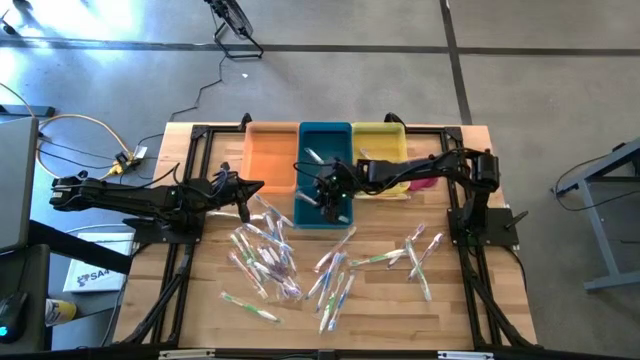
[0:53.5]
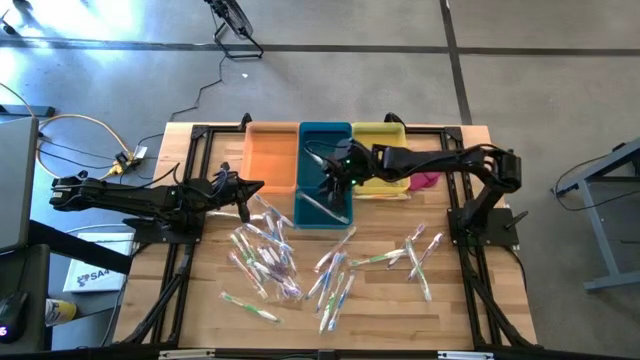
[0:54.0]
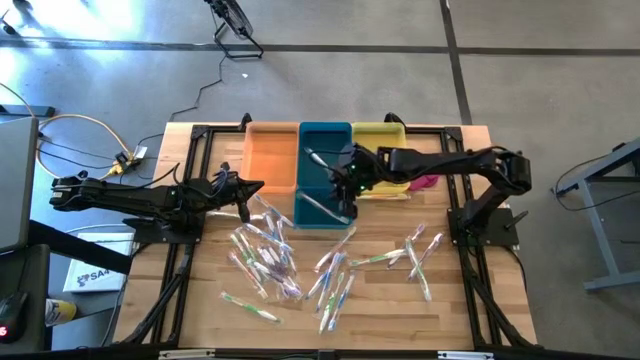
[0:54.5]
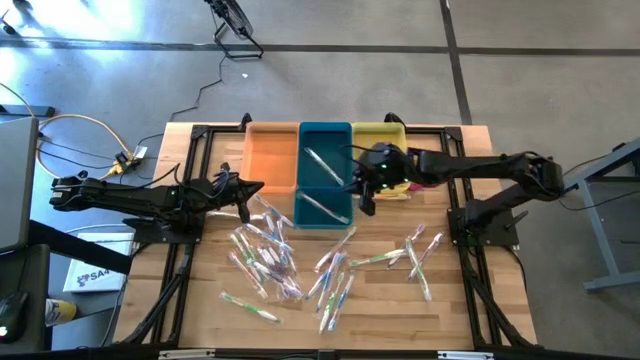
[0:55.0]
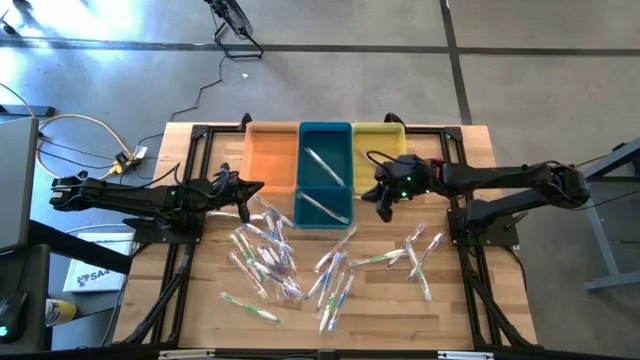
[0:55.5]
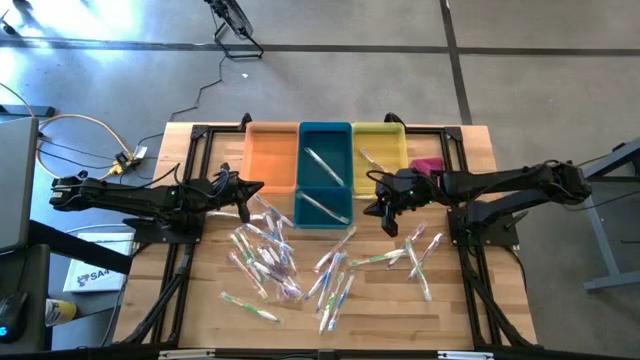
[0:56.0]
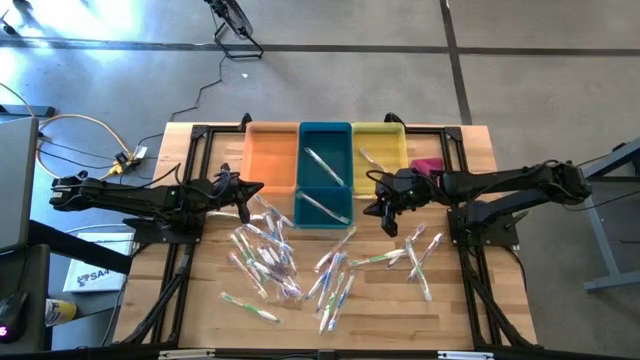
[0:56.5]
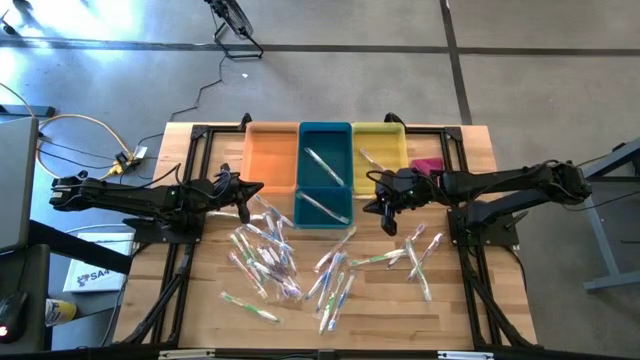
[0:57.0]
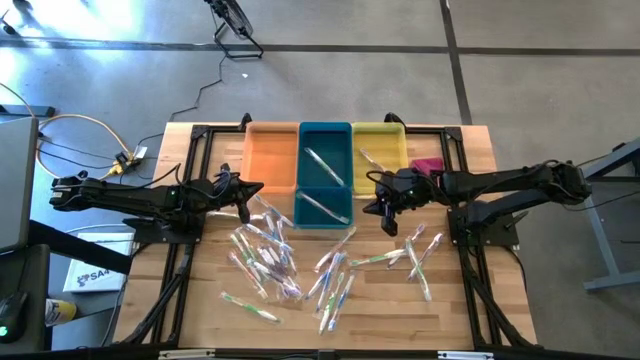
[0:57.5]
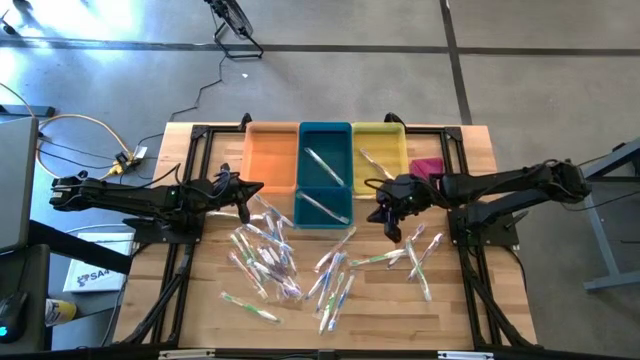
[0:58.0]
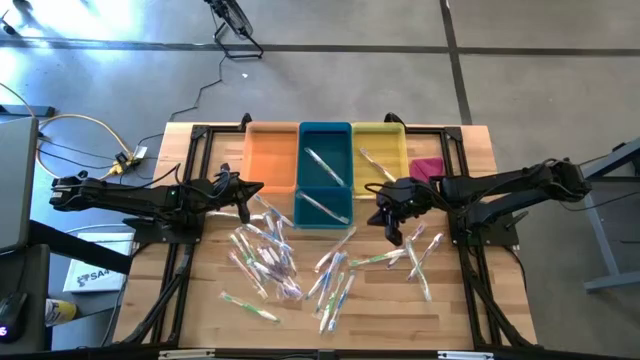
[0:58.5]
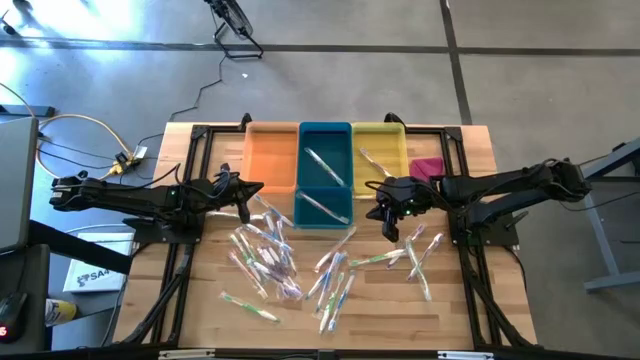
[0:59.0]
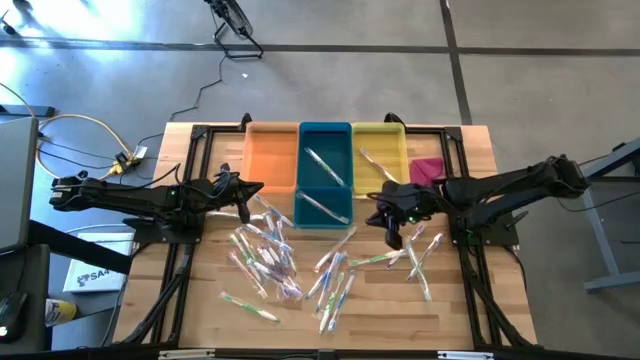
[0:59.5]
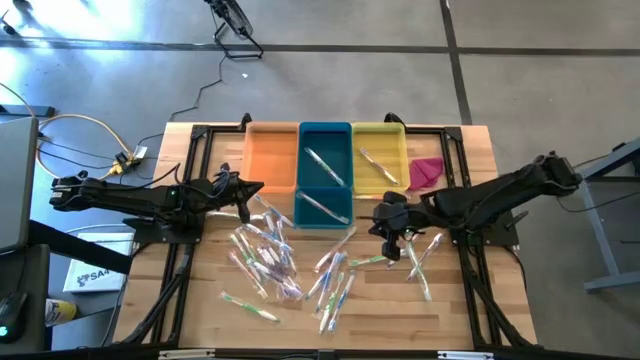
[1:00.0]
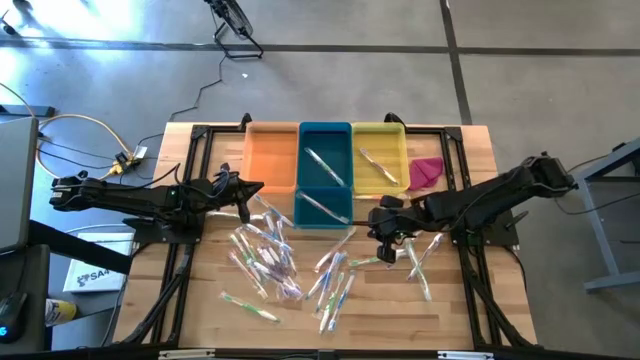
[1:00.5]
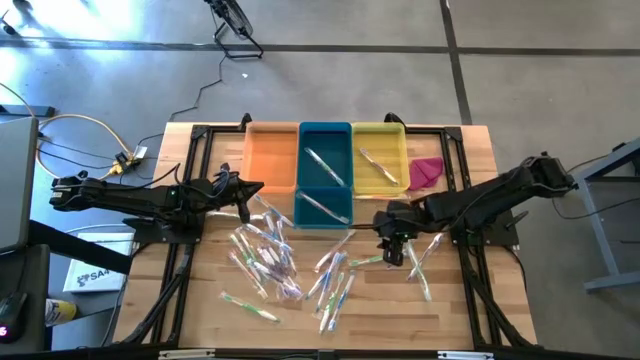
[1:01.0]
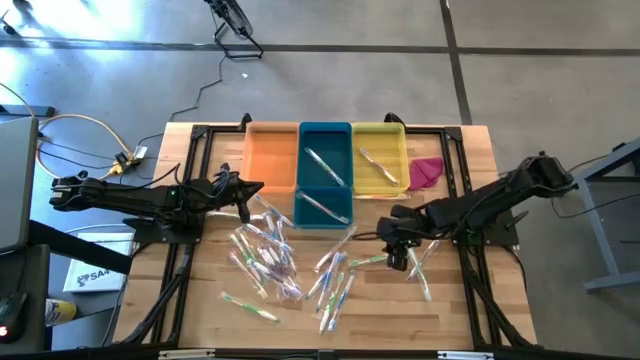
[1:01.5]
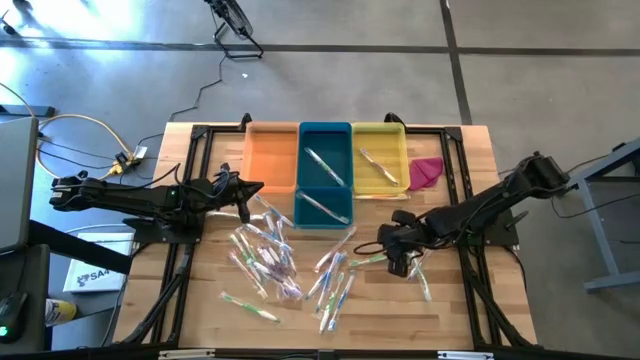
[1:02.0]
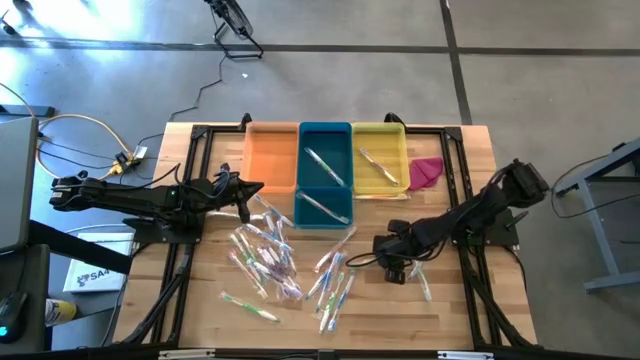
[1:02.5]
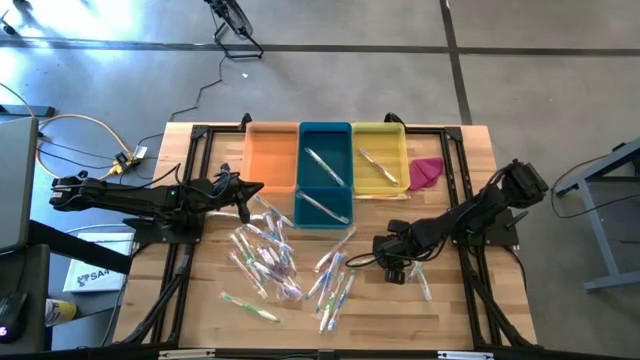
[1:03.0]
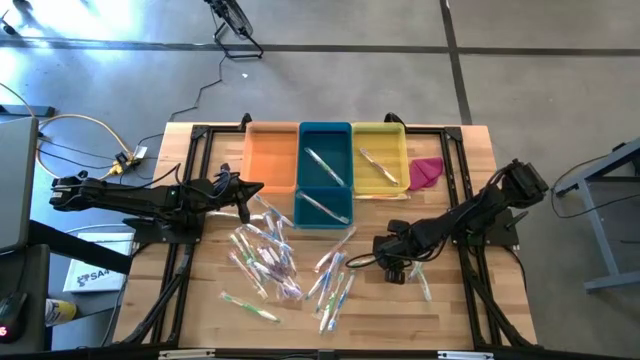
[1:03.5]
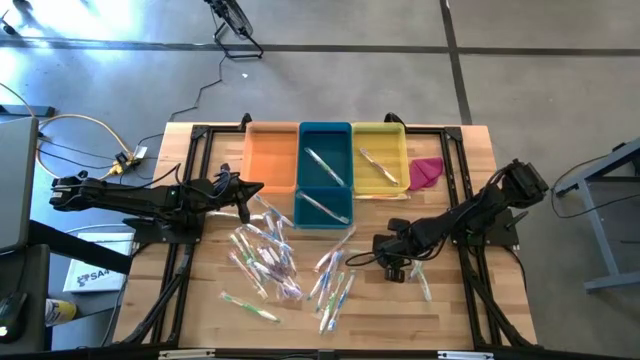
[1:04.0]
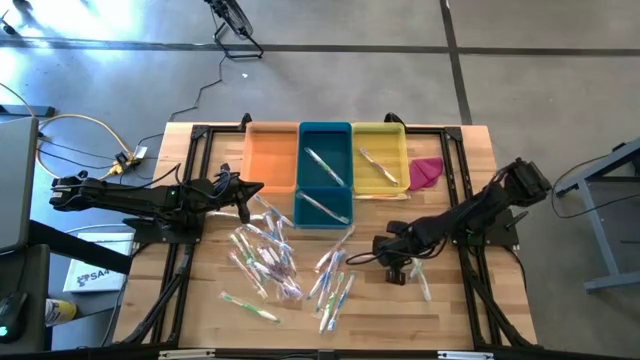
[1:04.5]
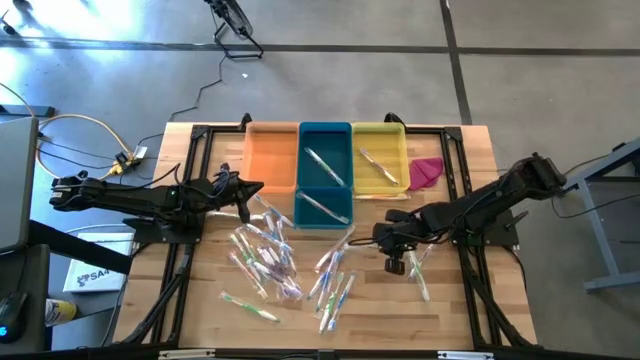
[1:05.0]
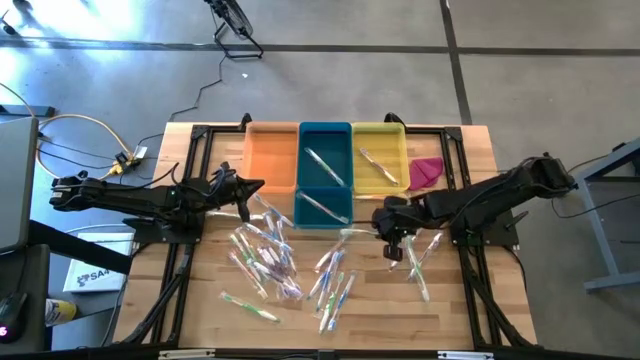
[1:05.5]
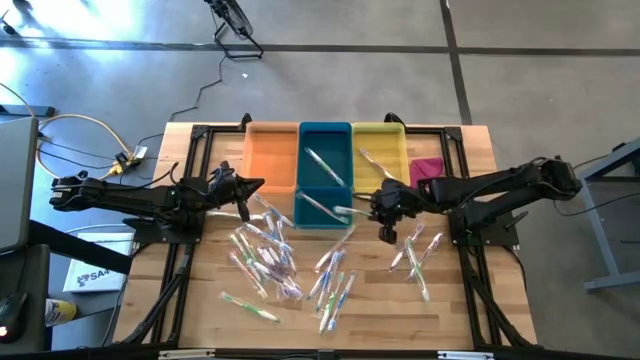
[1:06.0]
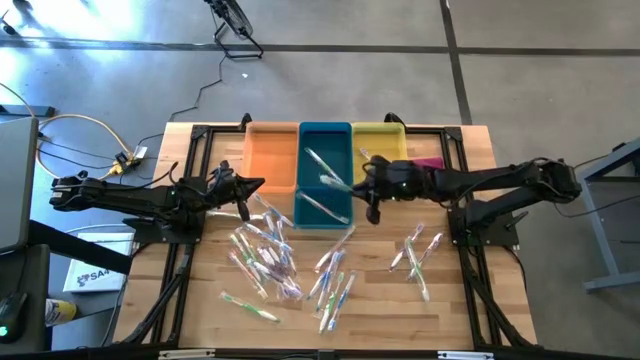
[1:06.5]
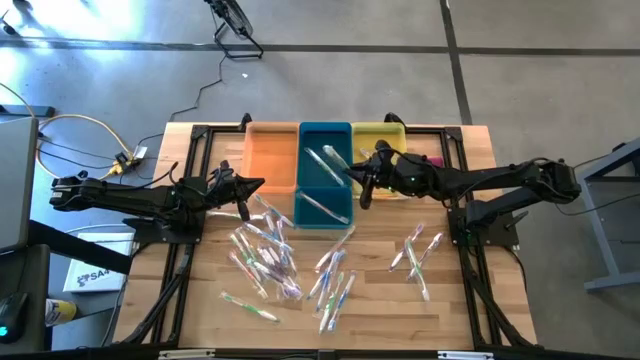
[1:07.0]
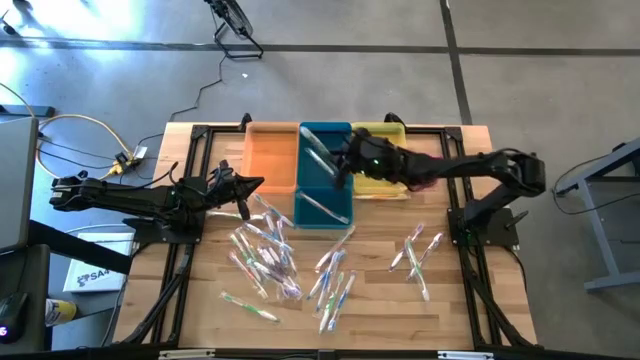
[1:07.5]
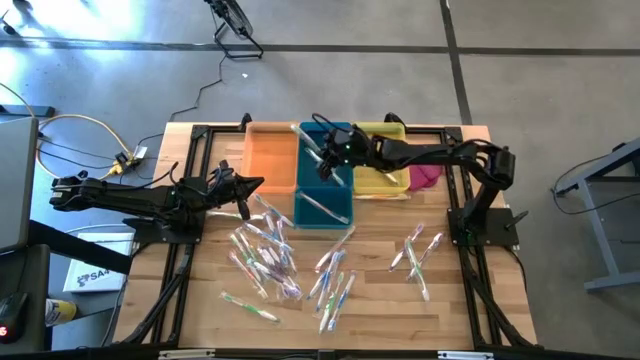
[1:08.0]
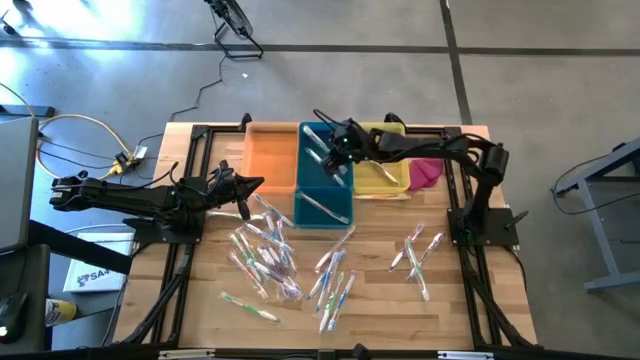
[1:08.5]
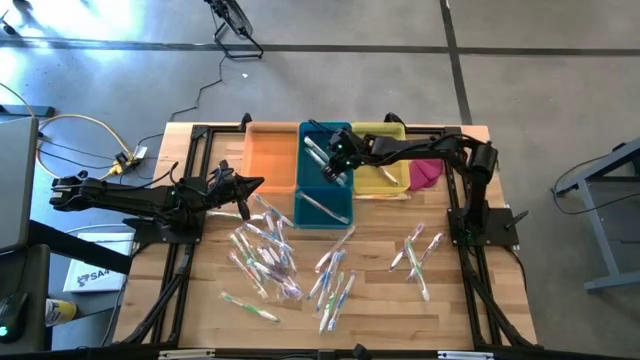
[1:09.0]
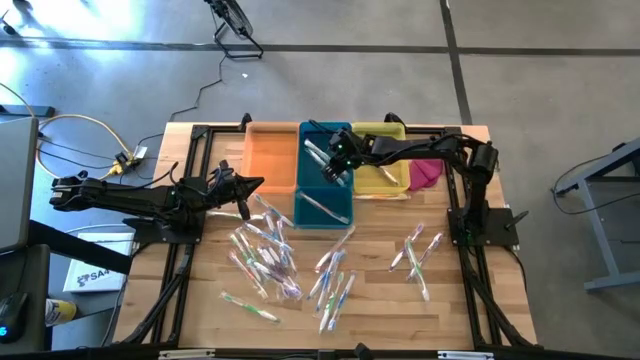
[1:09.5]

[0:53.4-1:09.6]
Task: Pick & Place Toothbrushes
Put the green toothbrush into the top blue bin

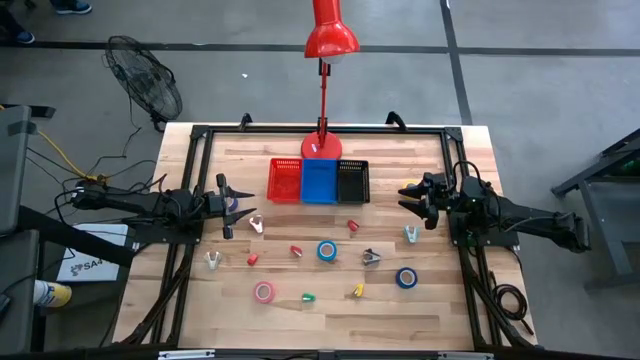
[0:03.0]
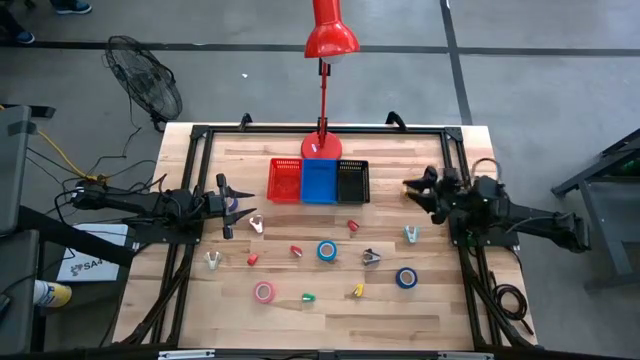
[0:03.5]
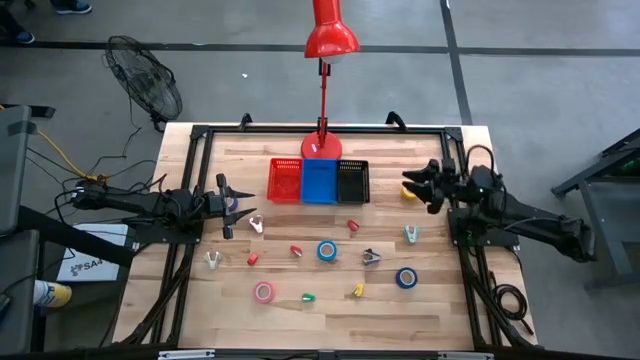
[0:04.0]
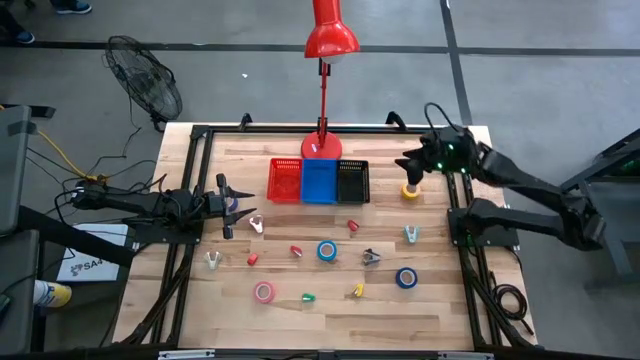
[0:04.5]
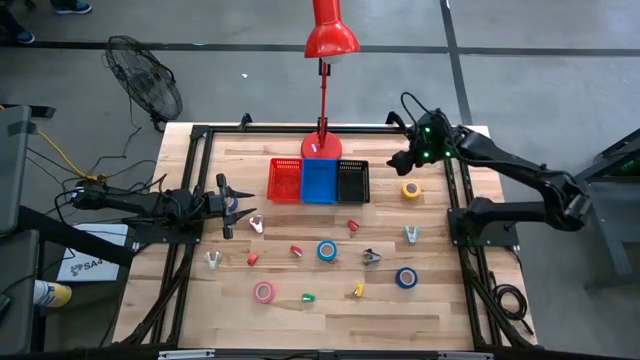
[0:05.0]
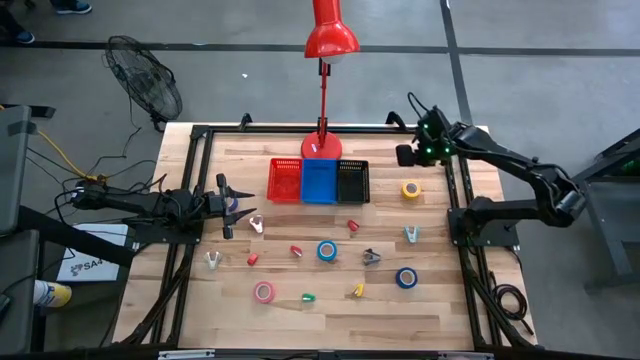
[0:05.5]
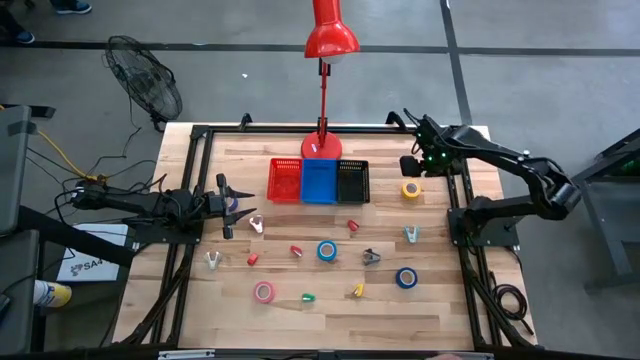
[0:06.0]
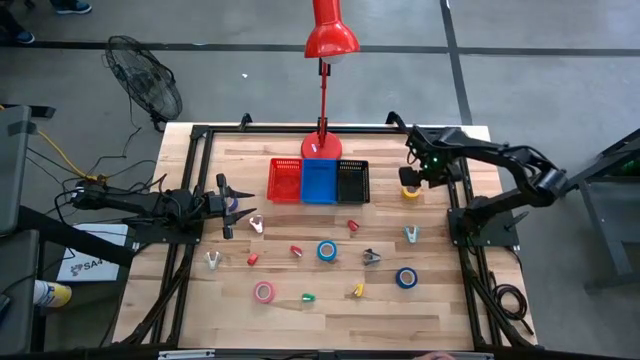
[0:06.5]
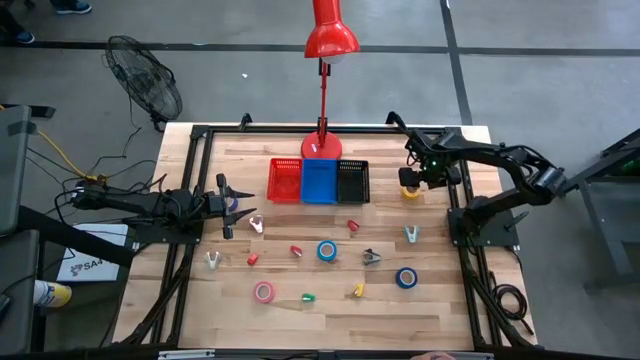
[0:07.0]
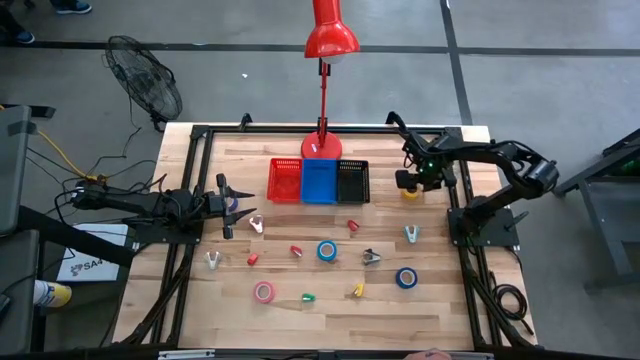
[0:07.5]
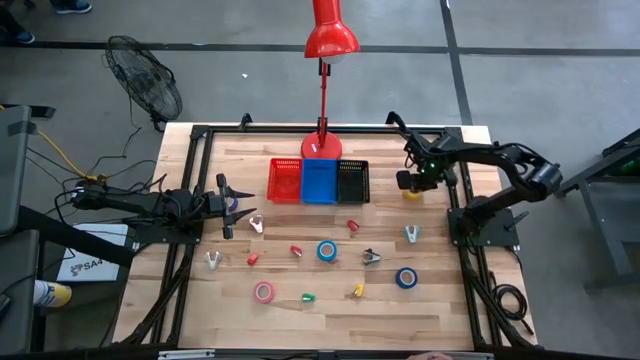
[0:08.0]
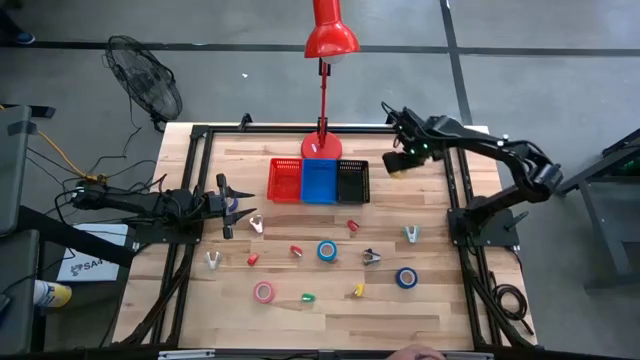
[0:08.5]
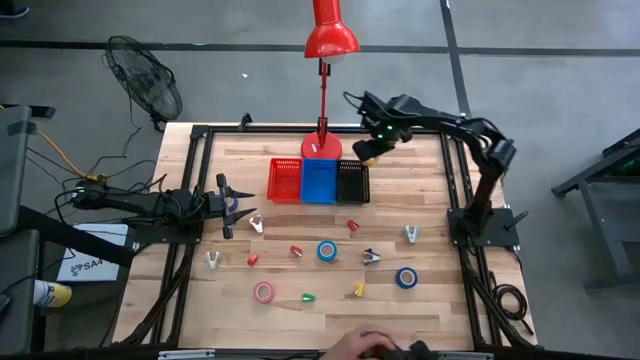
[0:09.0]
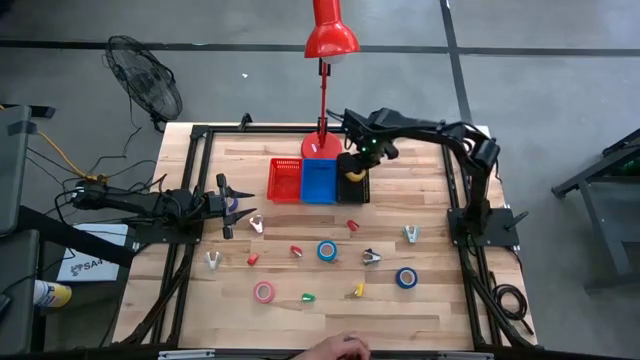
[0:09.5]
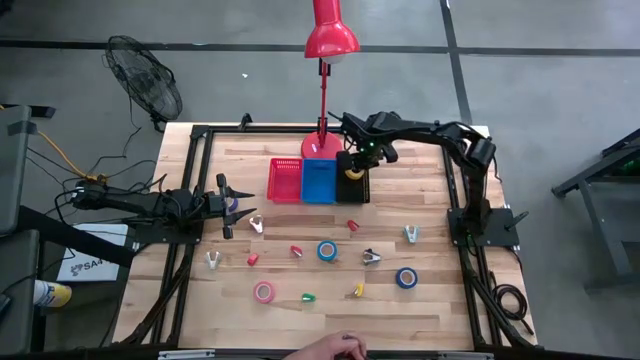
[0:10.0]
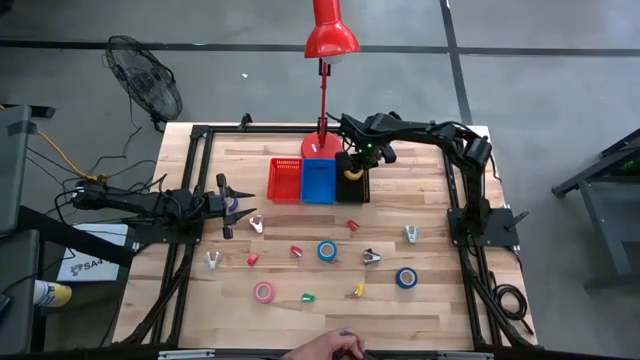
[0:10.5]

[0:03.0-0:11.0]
Task: Pick and place Stapler, Stapler remover, tape
Put the yellow tape into the black basket
